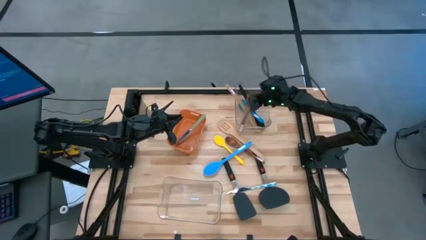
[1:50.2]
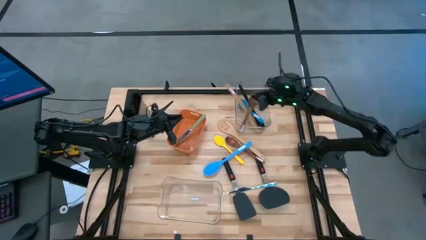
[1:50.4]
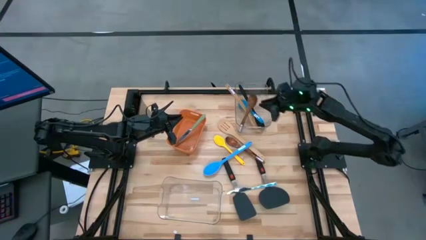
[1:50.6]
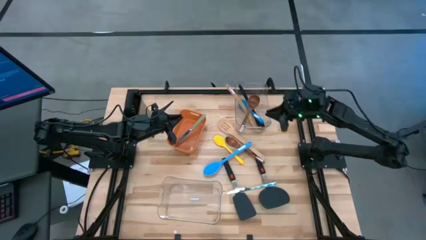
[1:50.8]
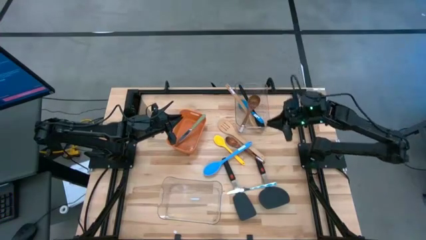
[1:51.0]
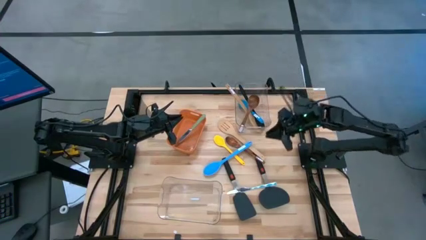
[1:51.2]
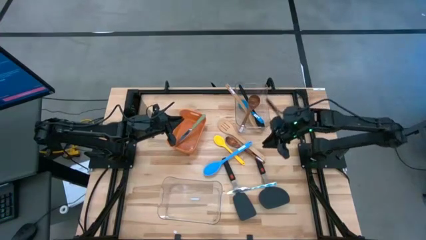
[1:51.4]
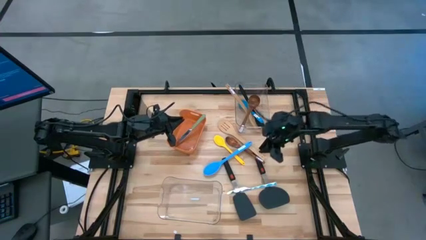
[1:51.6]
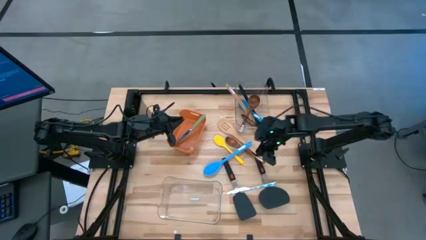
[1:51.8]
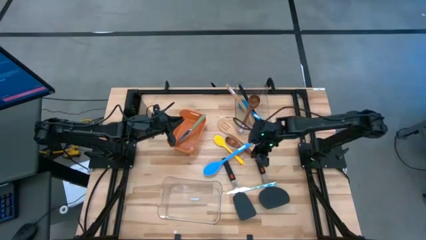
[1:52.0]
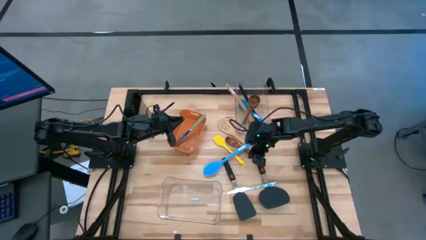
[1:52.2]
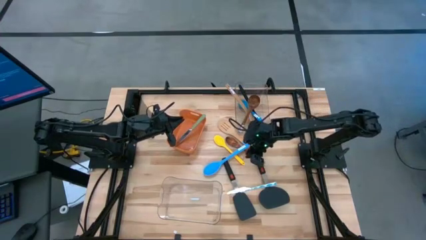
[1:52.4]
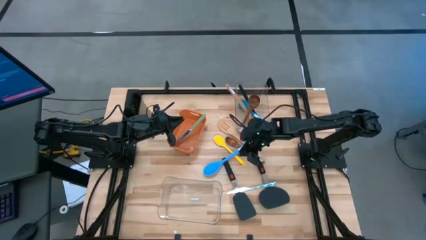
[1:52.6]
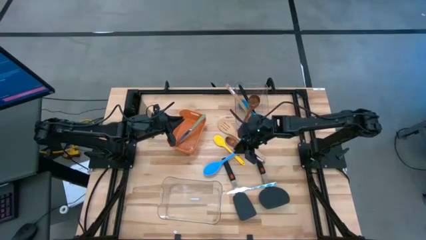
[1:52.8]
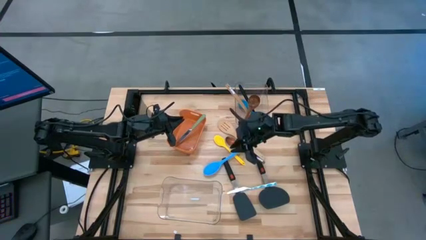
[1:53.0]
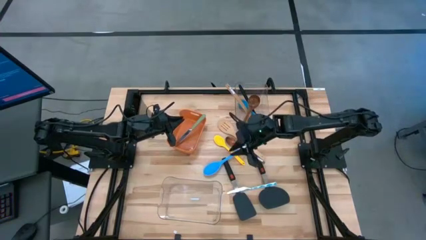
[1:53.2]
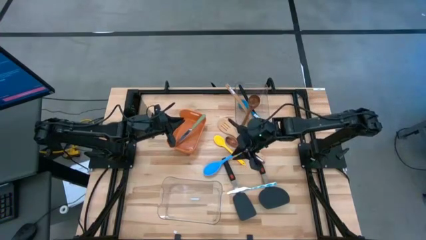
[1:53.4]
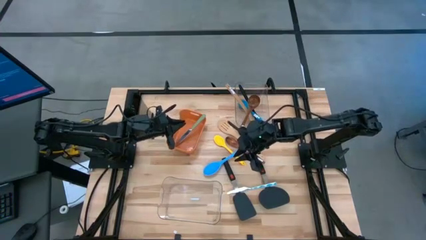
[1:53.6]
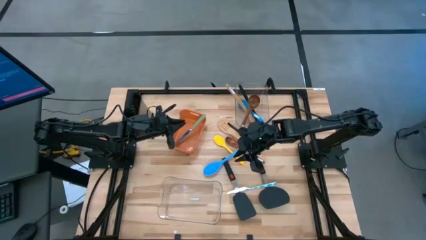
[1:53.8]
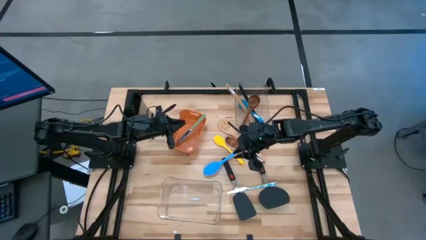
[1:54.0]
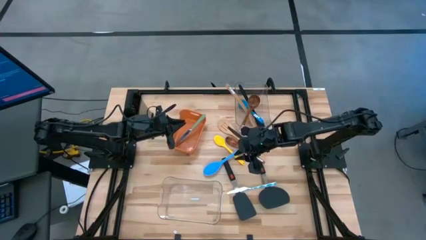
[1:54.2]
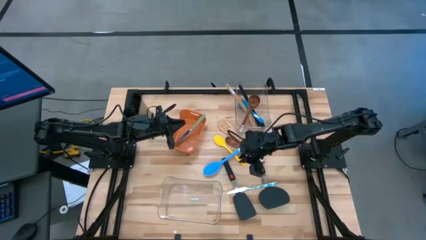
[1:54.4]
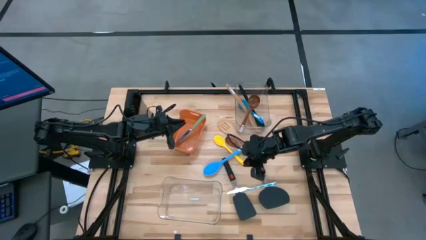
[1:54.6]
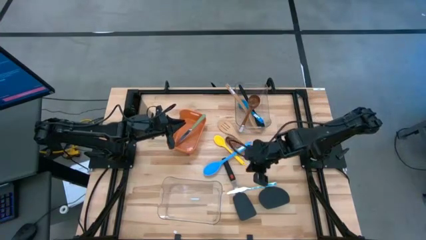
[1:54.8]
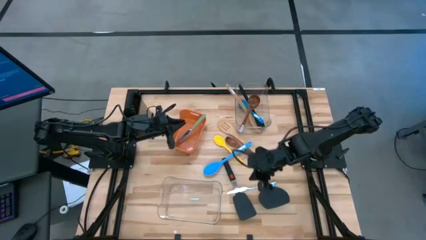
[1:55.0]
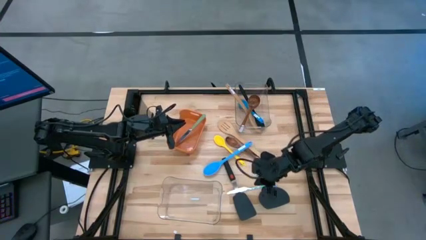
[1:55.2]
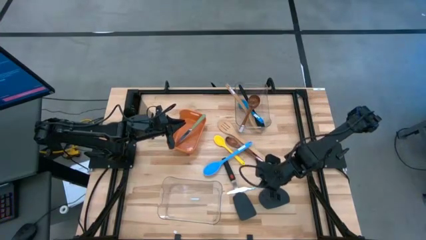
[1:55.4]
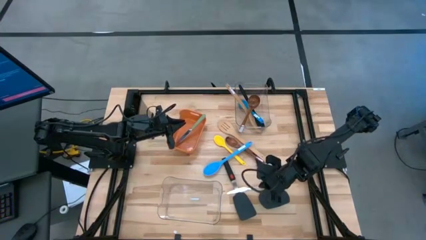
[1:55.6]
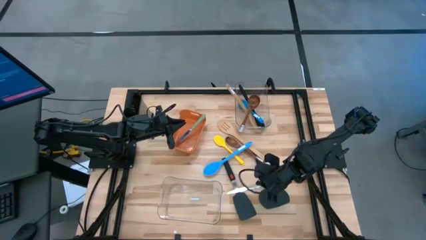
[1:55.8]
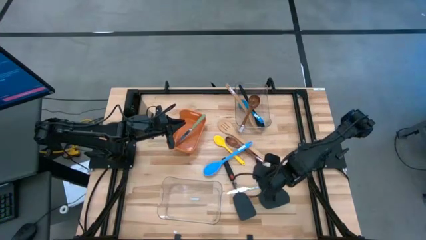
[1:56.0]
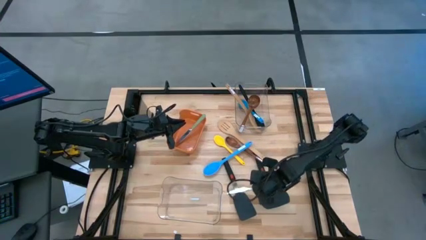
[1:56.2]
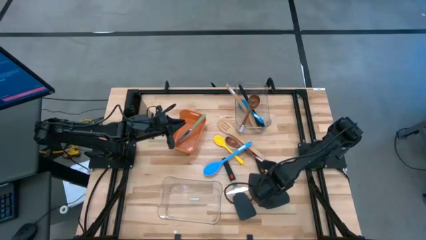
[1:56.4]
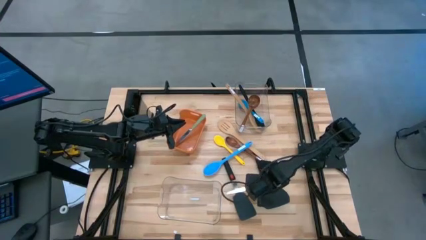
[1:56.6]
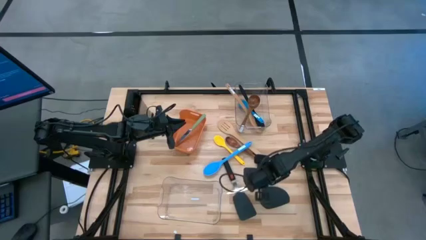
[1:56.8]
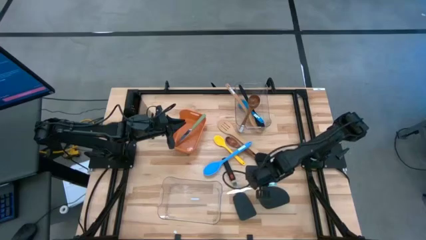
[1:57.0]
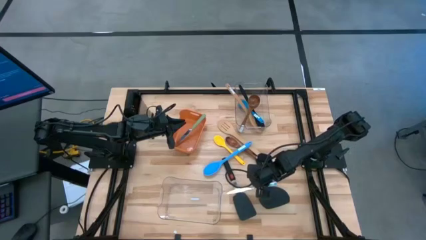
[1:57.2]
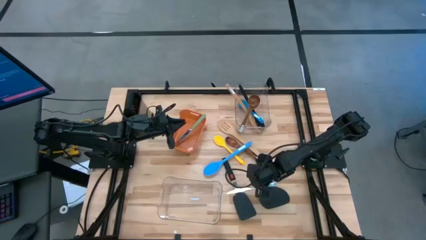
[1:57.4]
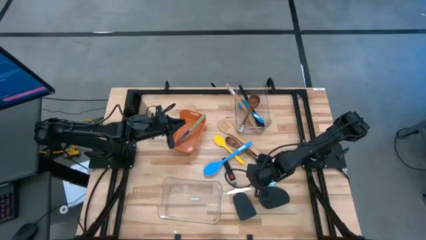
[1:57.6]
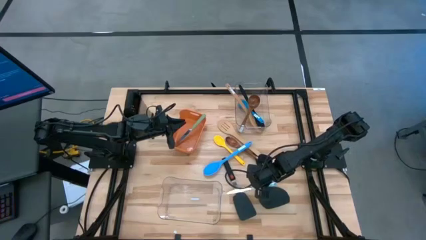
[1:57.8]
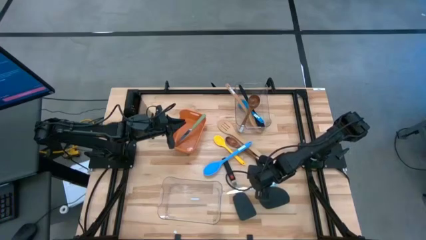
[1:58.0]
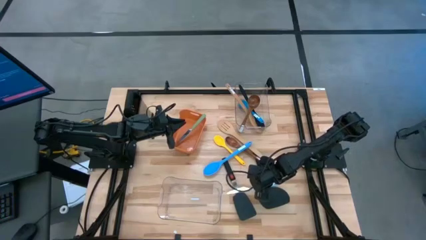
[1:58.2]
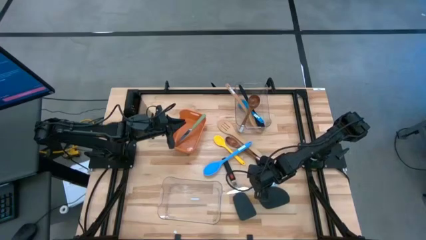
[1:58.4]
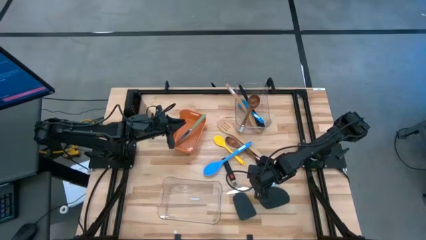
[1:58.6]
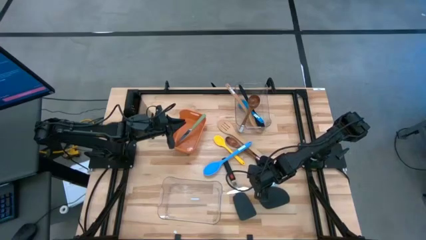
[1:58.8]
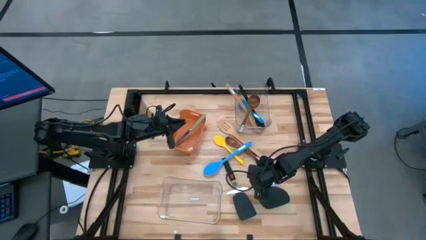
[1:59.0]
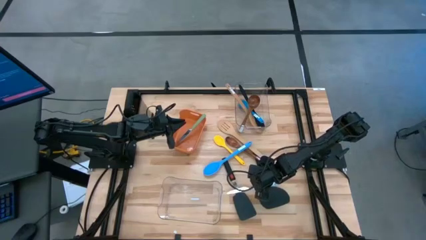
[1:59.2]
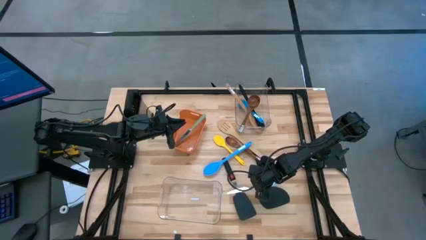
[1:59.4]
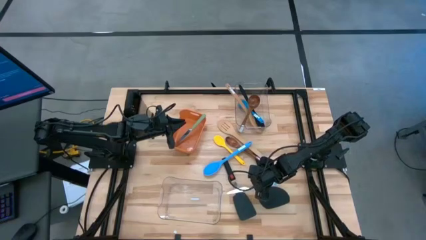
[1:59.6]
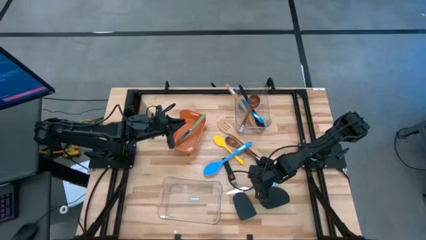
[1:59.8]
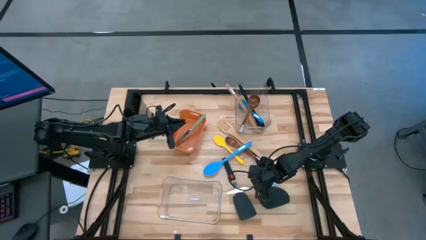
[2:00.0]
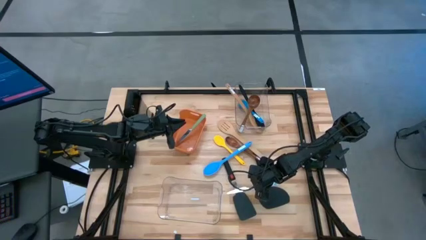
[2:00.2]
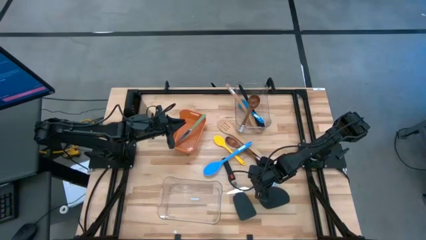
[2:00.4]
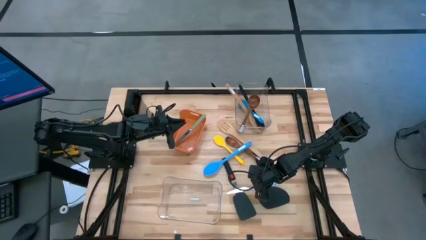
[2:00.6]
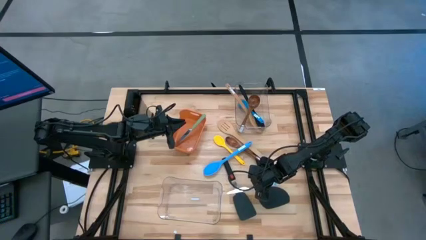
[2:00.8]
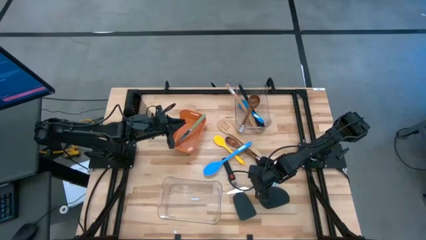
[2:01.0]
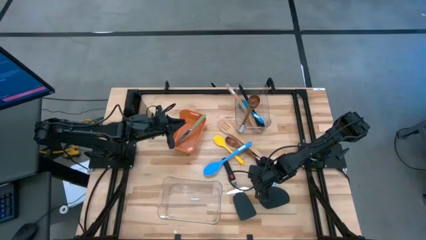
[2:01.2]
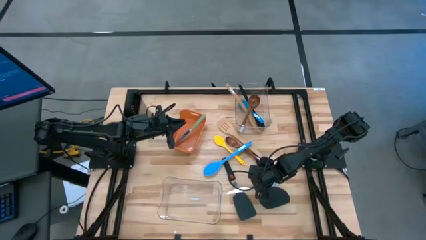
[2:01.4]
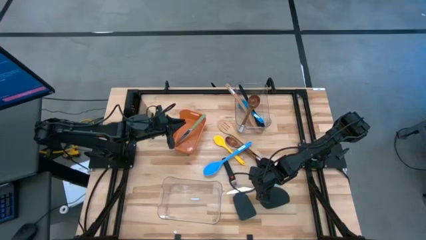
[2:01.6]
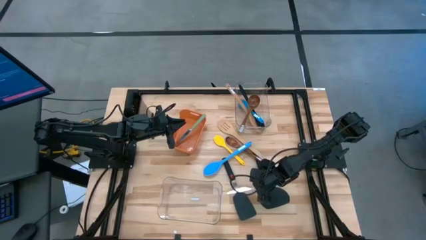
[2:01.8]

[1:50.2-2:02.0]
Task: Pick & Place Kitchen Items
Put the table knife into the orange bin
